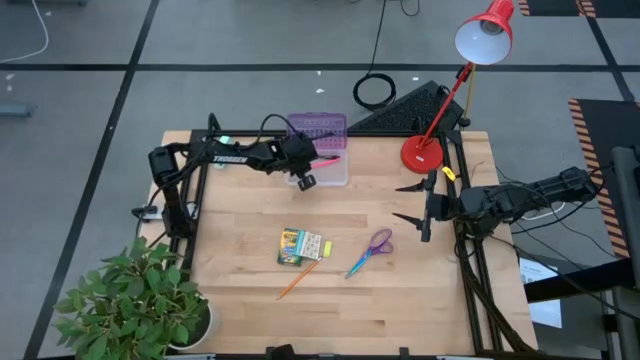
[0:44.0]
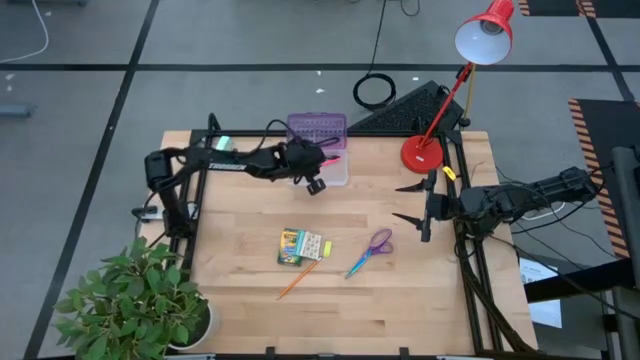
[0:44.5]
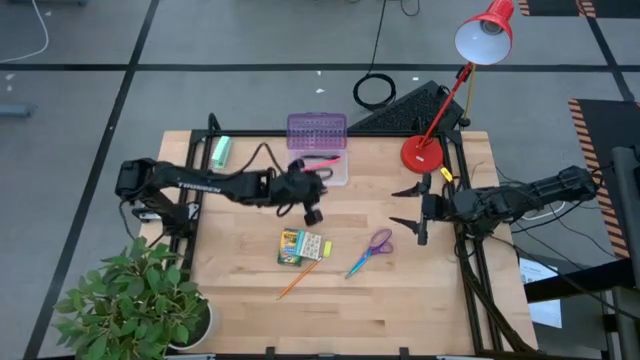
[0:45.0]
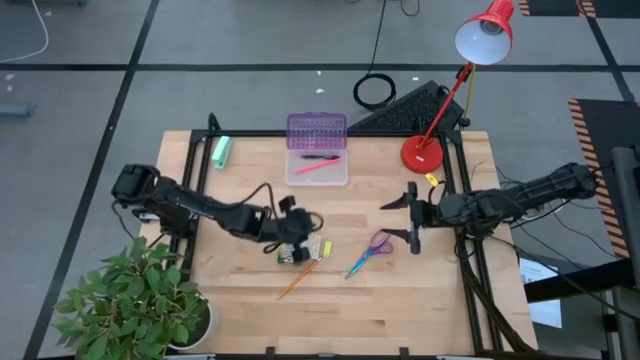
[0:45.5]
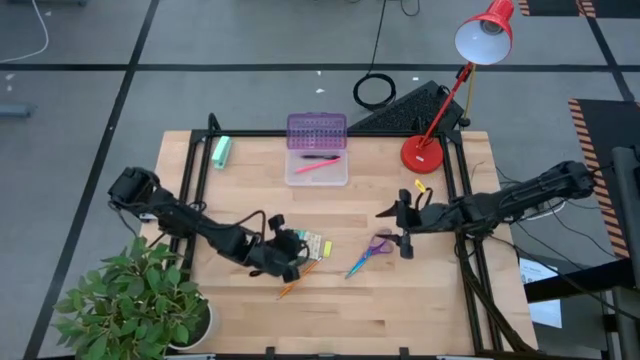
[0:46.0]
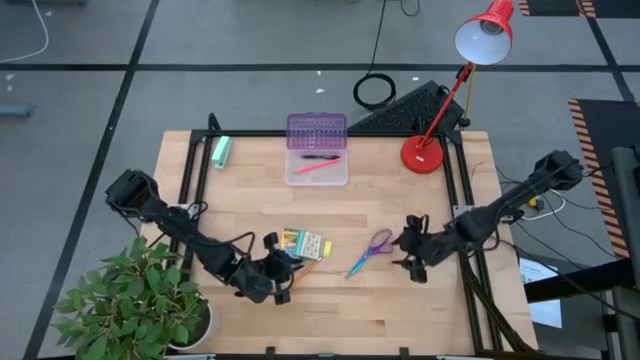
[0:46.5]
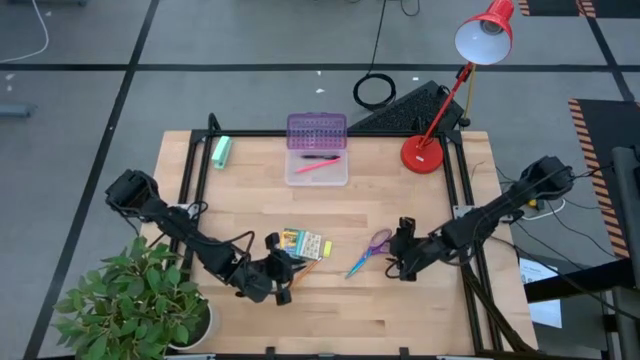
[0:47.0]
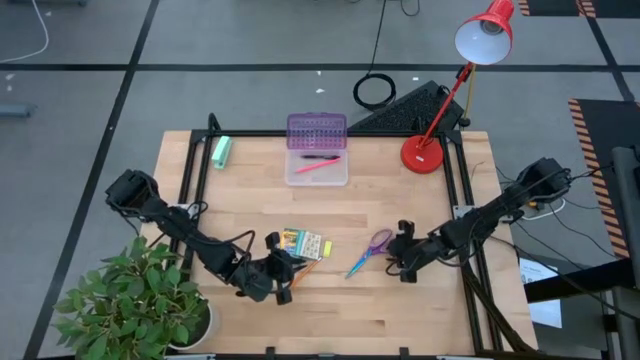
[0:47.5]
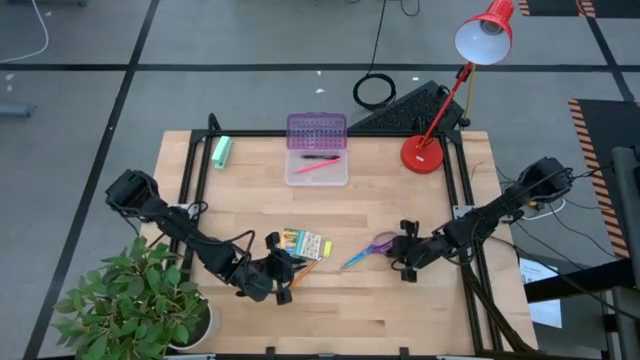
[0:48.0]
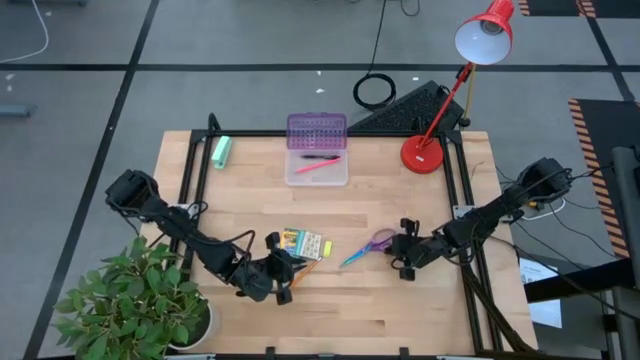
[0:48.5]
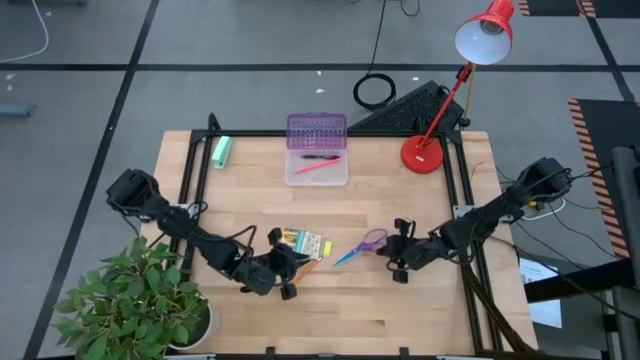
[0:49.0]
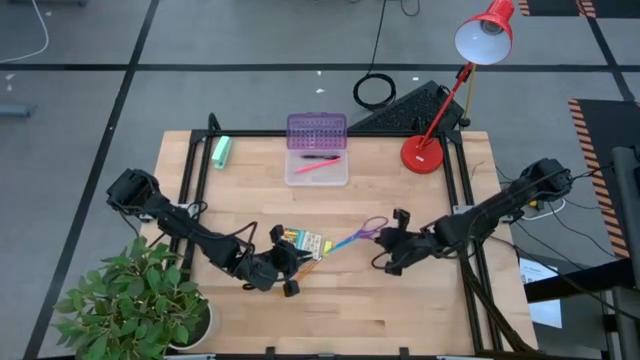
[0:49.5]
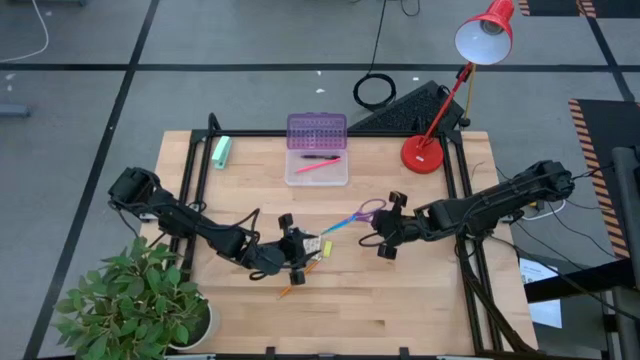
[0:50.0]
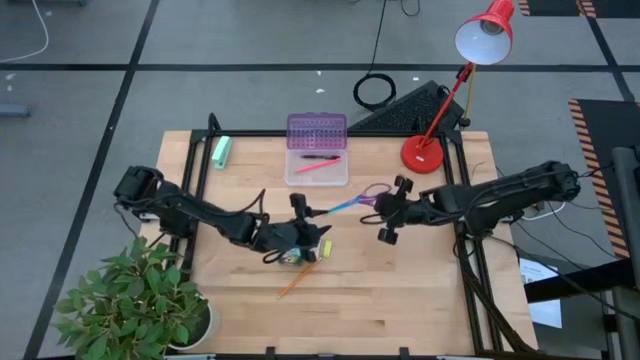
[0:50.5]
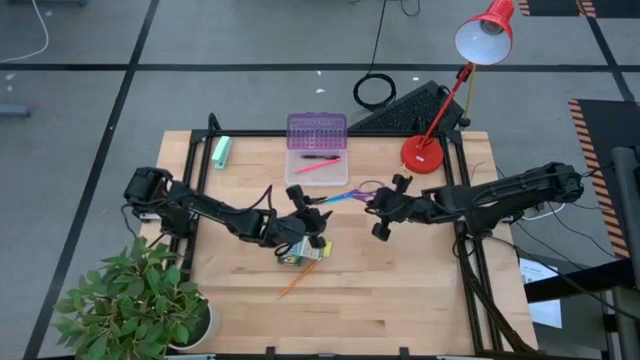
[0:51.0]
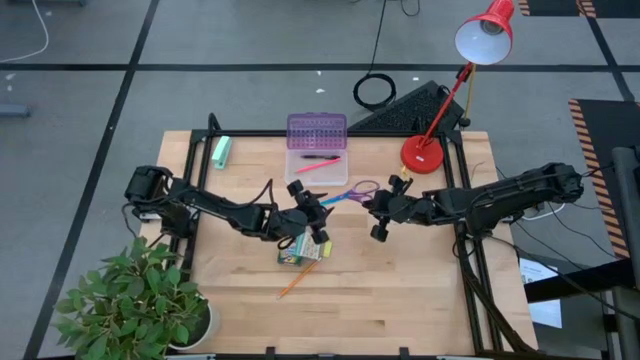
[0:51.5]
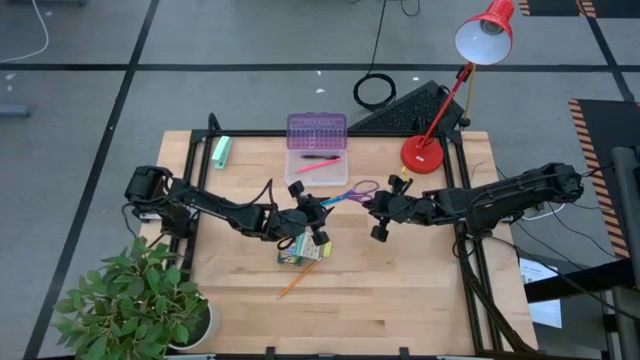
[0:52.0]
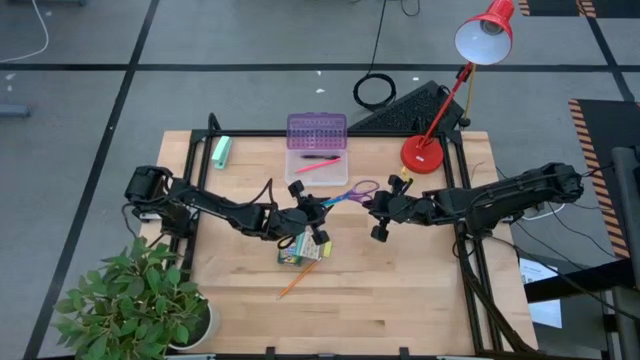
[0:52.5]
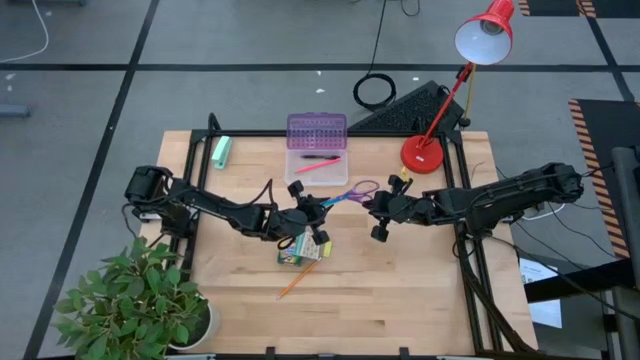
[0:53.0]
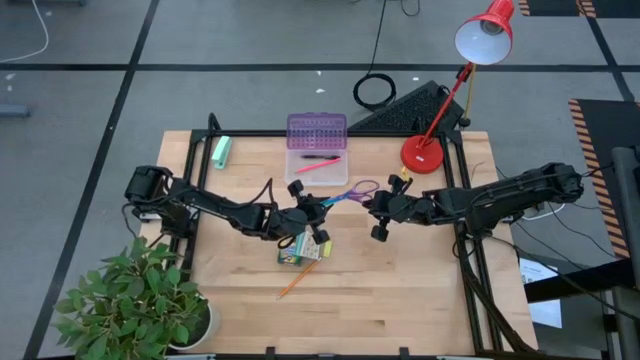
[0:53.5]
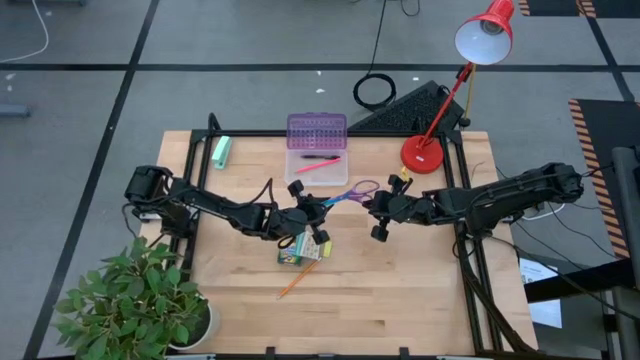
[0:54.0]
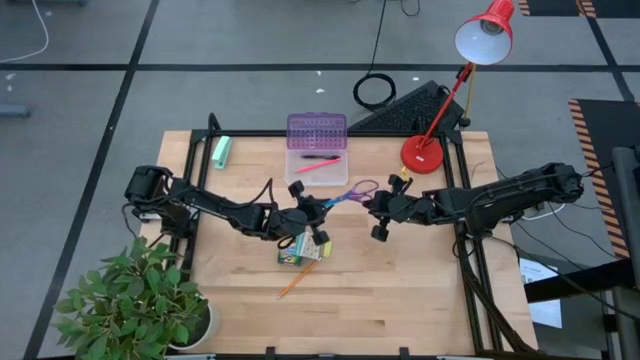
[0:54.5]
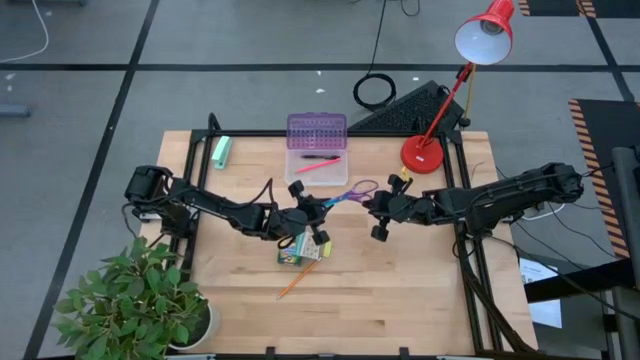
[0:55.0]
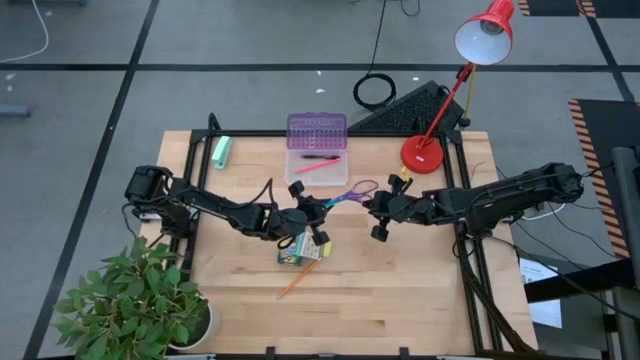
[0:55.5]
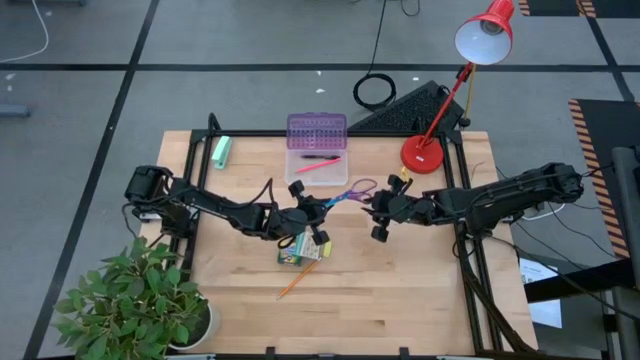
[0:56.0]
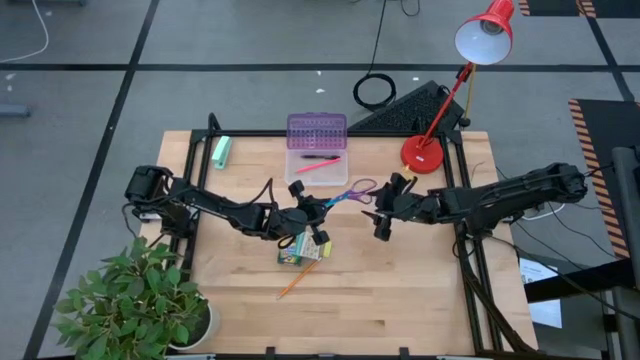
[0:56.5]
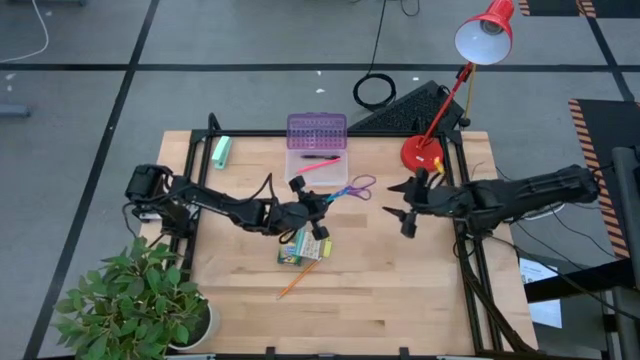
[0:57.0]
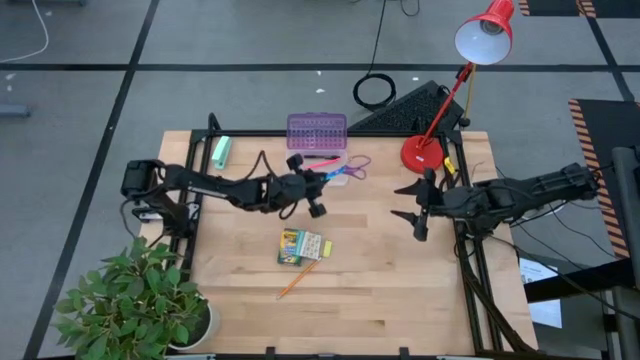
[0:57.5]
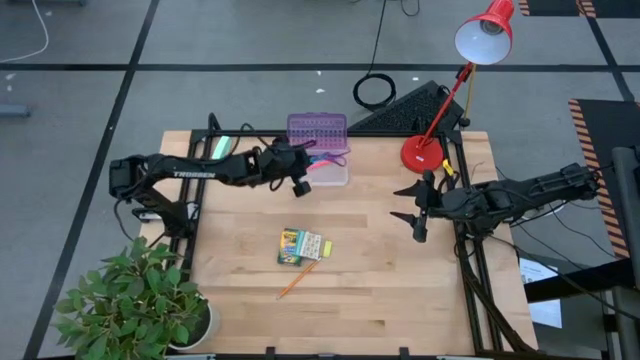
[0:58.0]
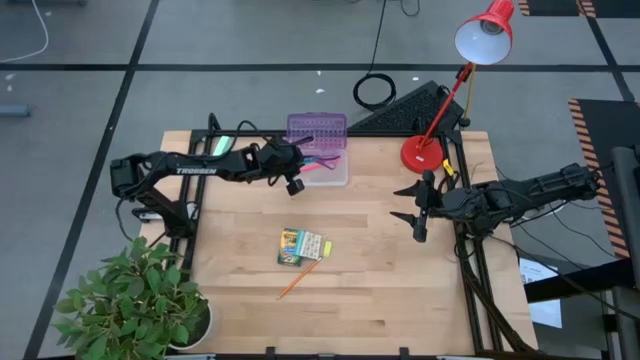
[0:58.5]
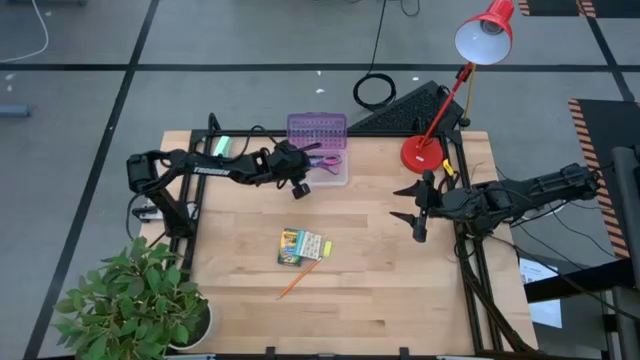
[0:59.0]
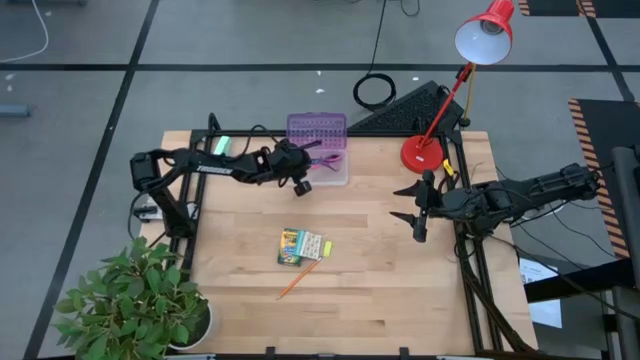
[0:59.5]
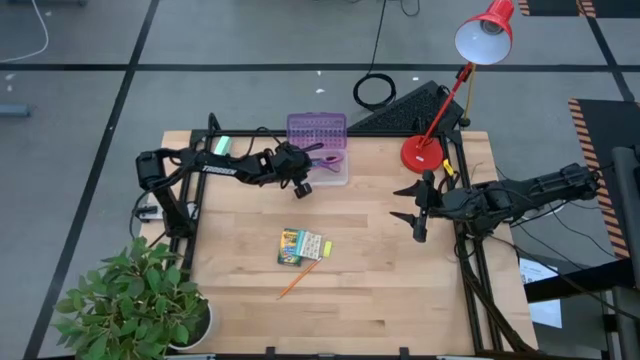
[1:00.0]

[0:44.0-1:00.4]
Task: Pack school essentials
Put the purple scissors into the purple supply box

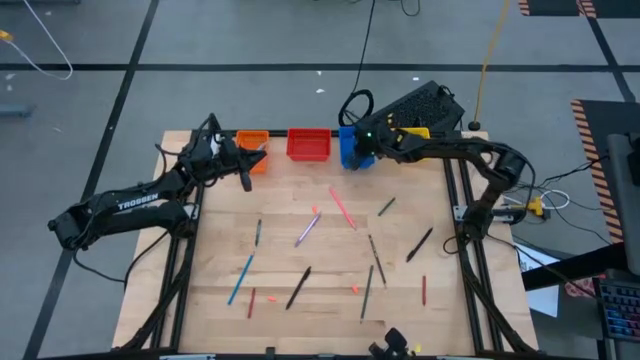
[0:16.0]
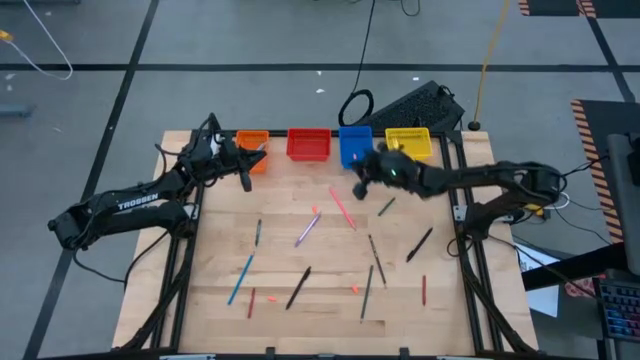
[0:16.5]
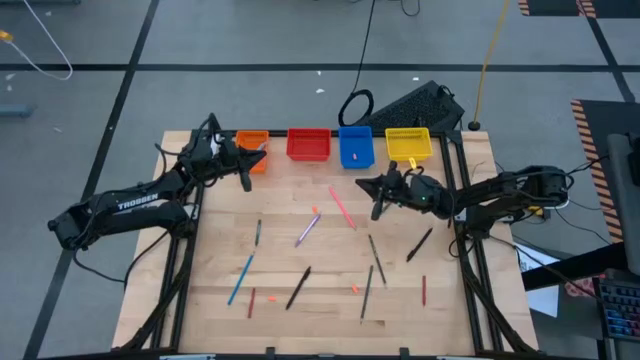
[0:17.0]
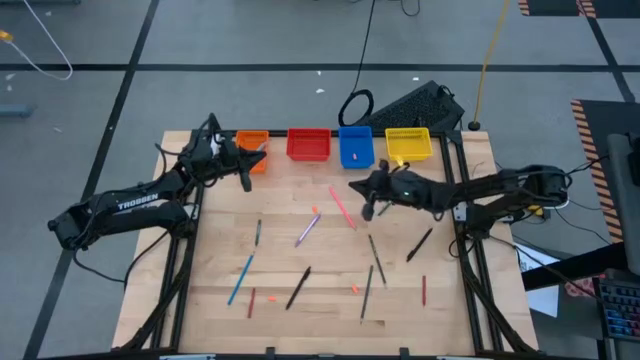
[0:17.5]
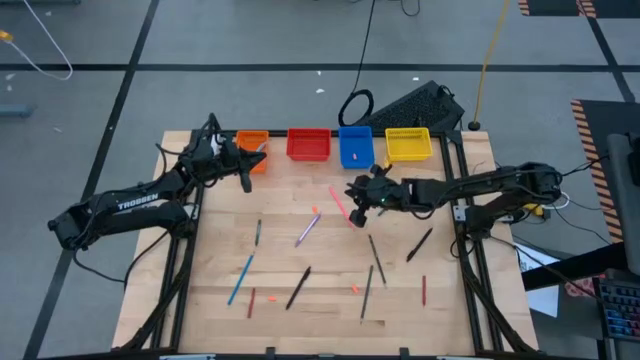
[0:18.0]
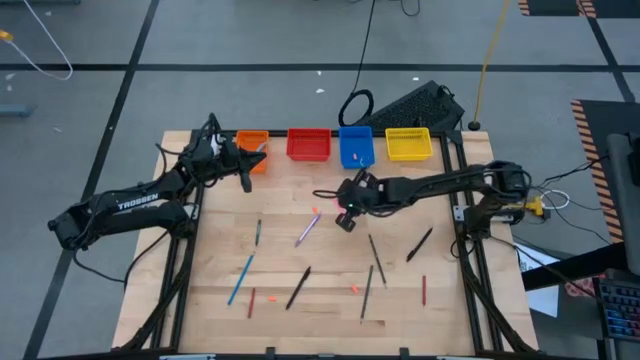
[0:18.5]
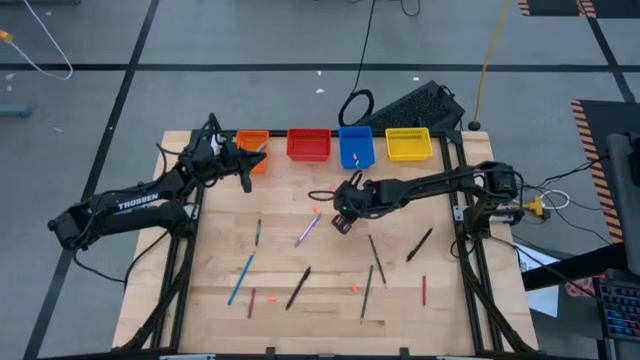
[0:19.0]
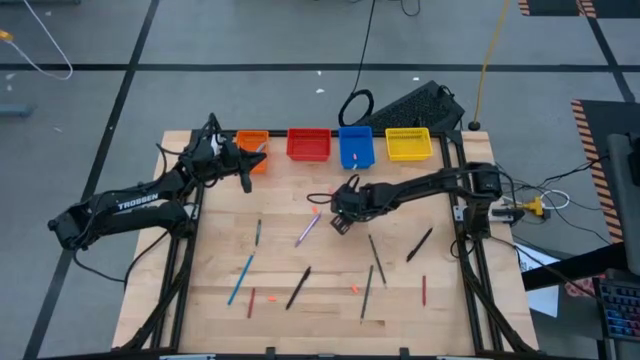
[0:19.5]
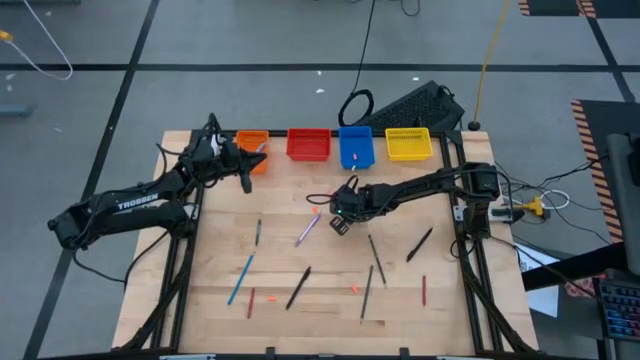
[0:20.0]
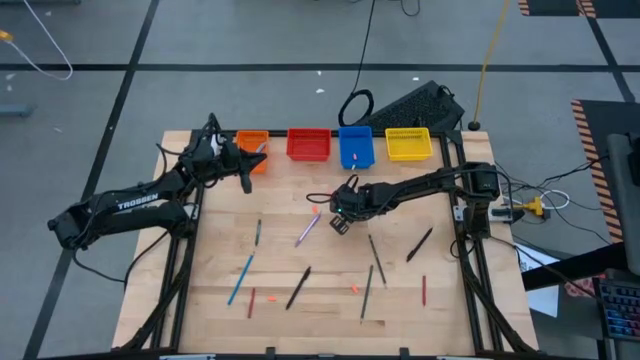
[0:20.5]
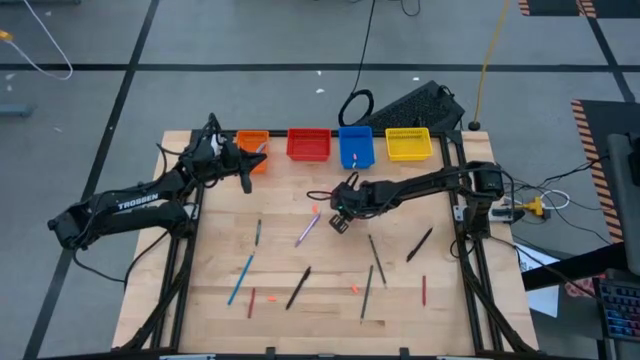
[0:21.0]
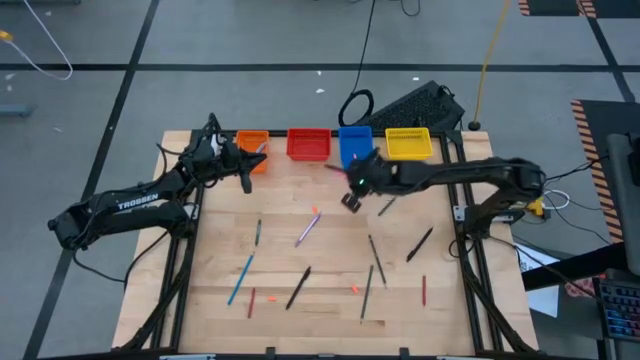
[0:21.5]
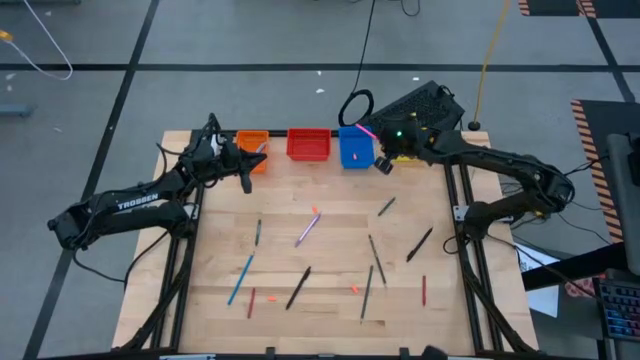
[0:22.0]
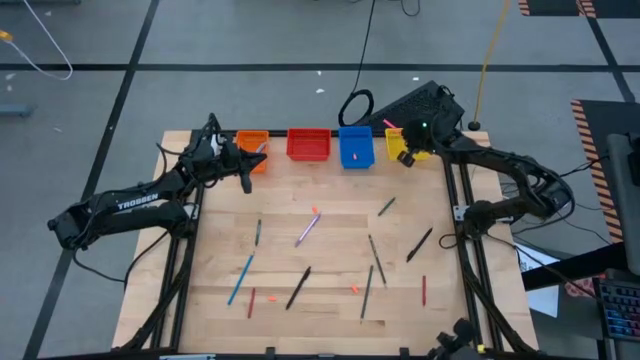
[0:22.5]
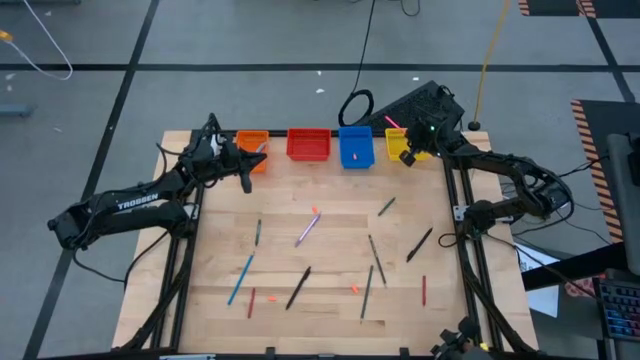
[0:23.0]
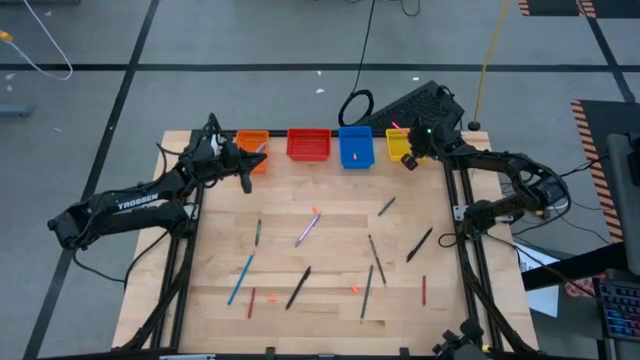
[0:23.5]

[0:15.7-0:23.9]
Task: Sort crayons/erasers/pens/pencils in bins
Put the pink pencil into the yellow basket
